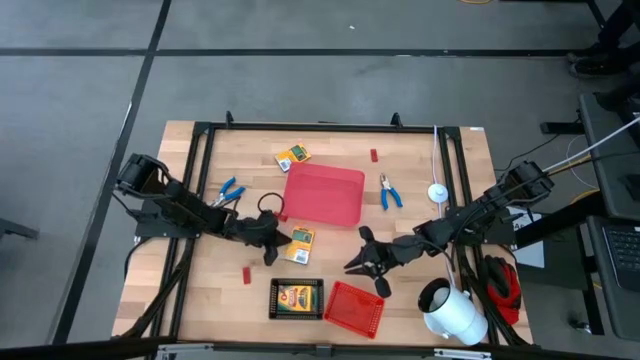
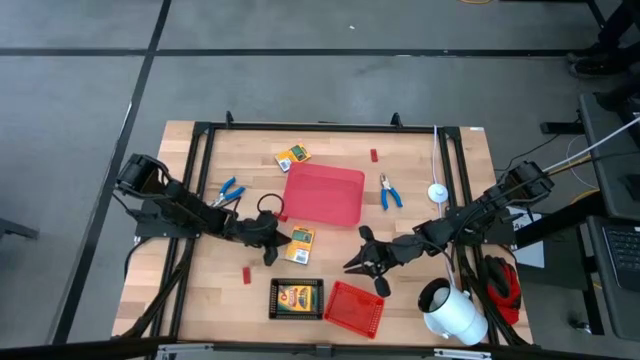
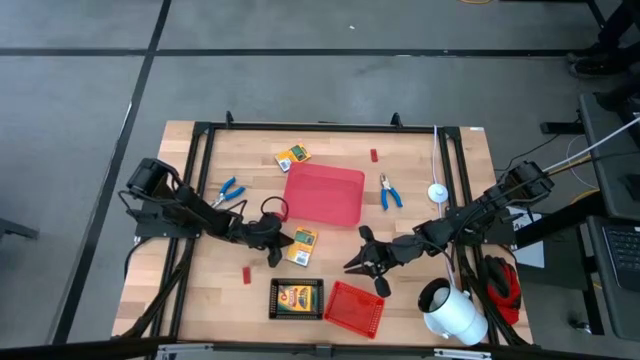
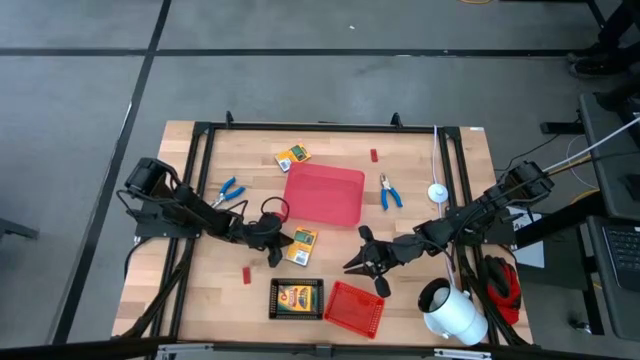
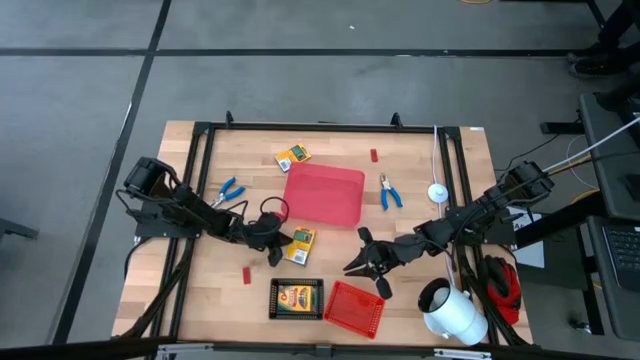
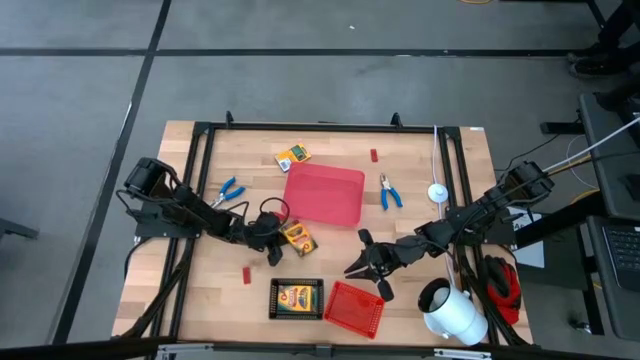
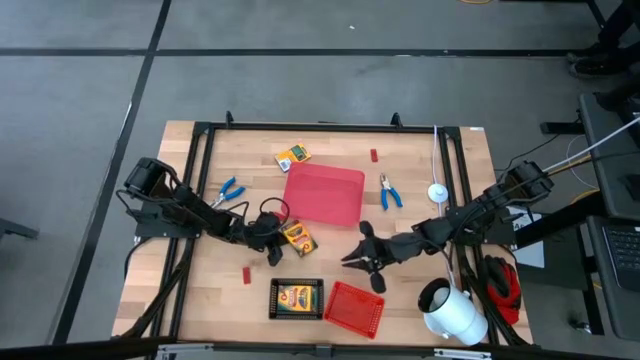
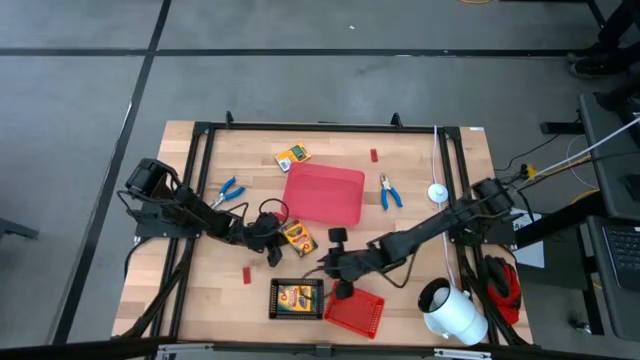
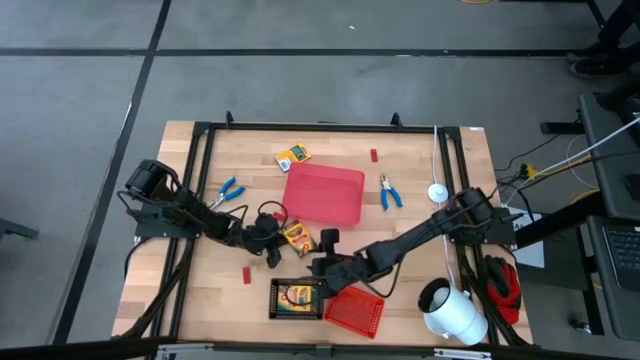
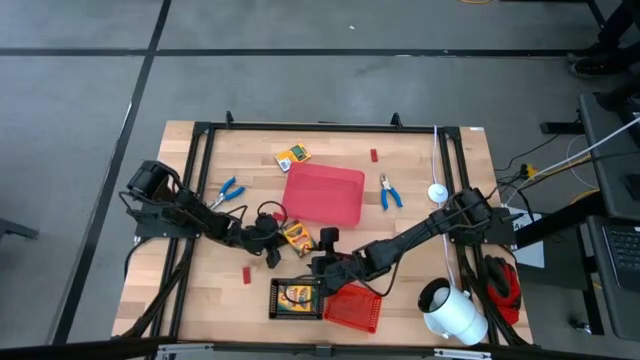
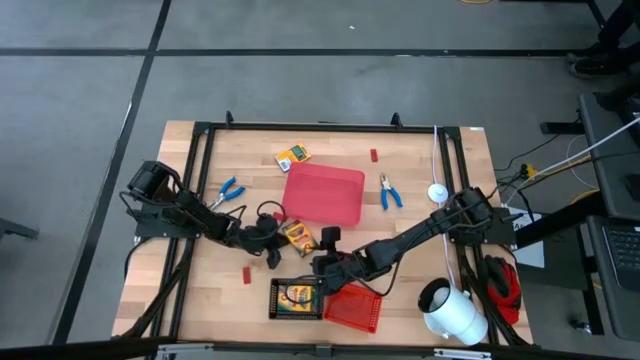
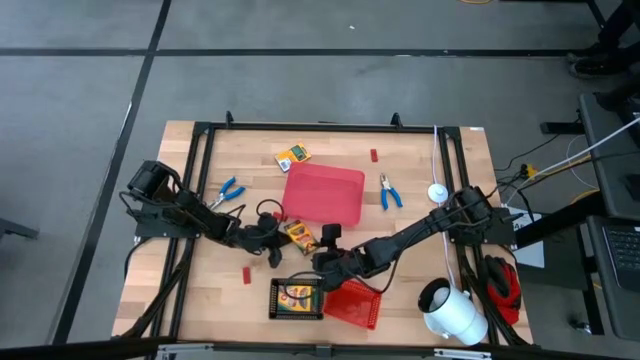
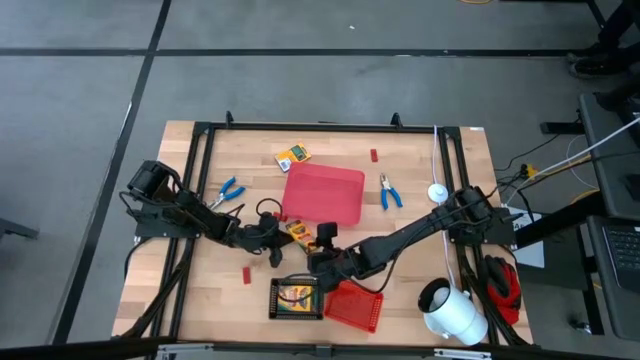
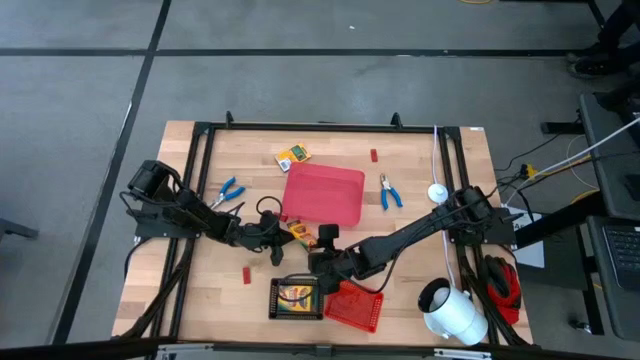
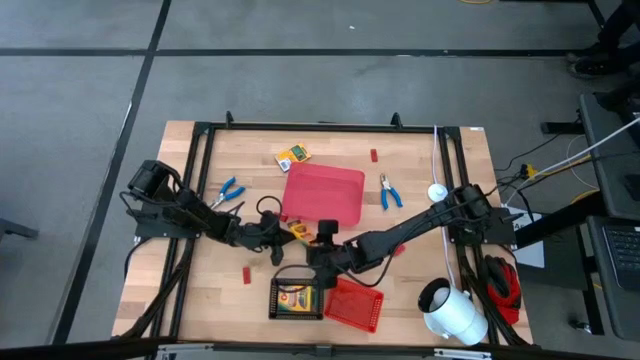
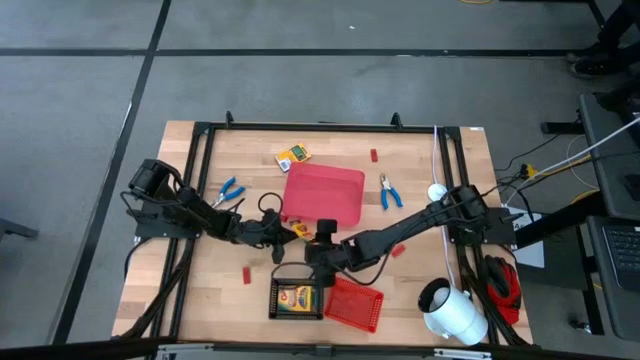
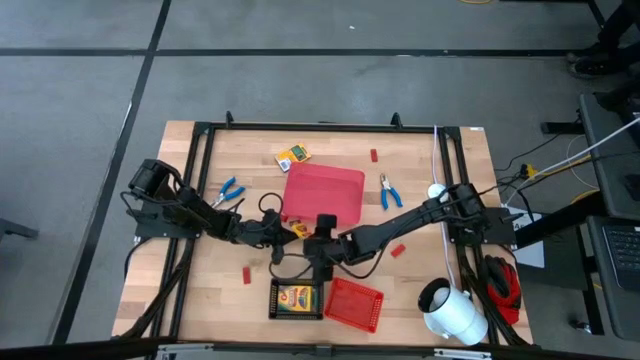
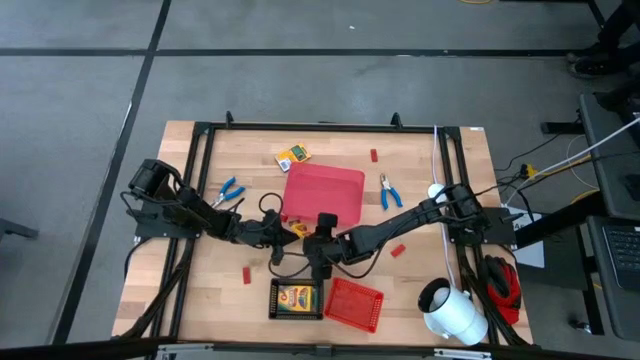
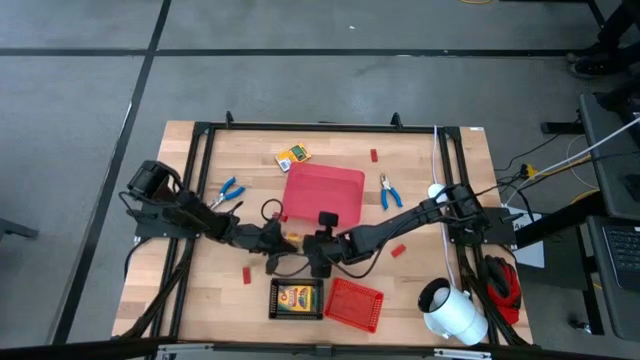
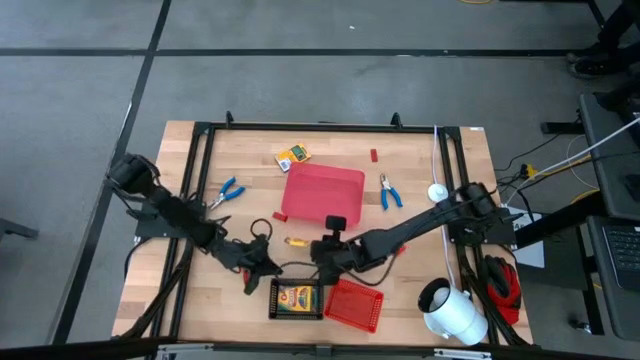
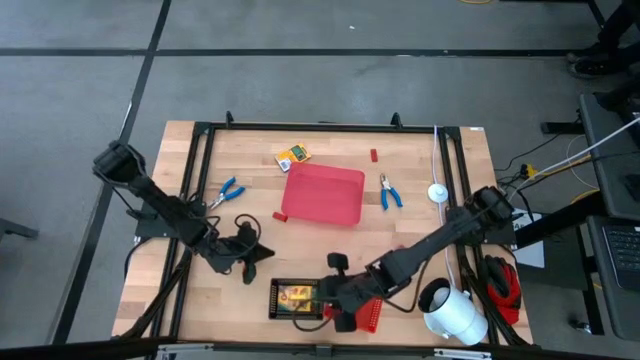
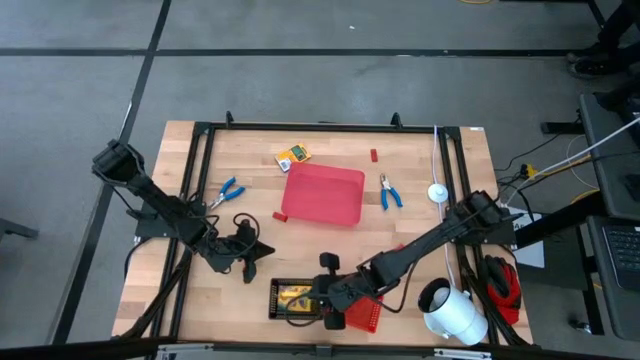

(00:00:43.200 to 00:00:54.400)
Task: Pick & Place School Supplies
Put the crayon box into the black bin

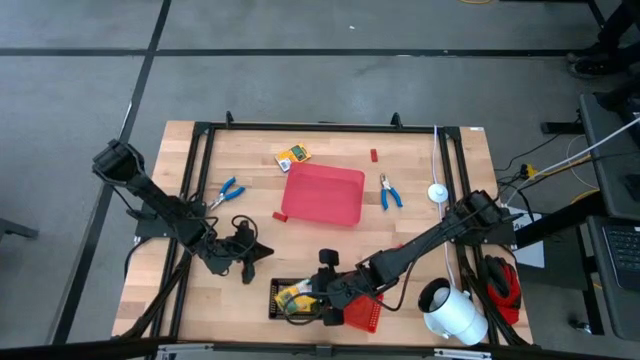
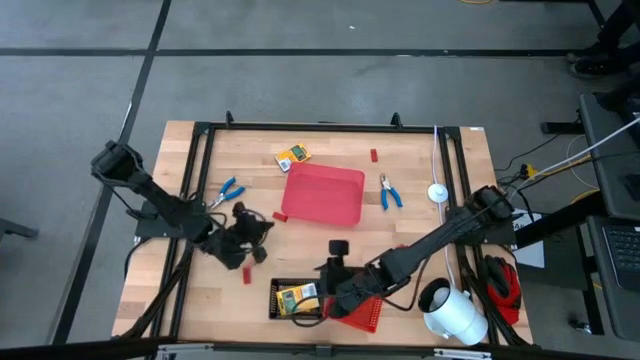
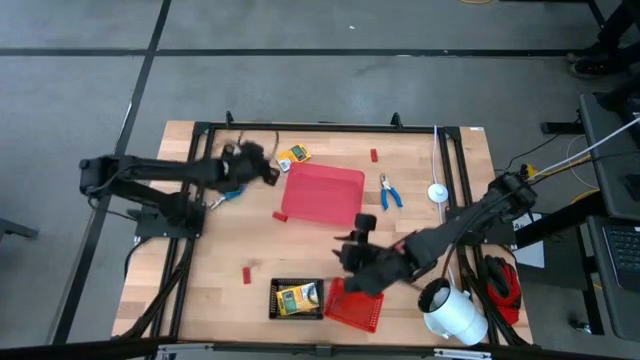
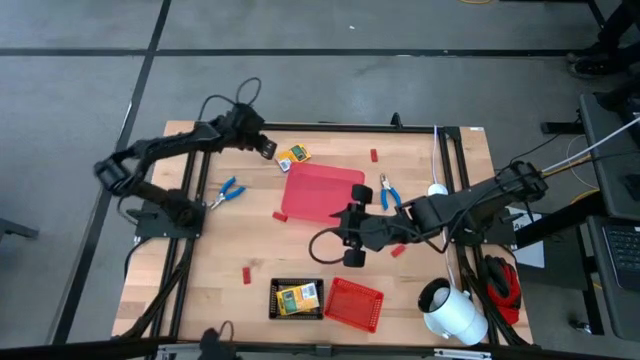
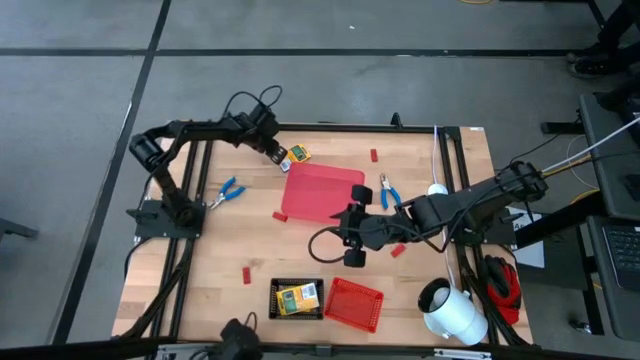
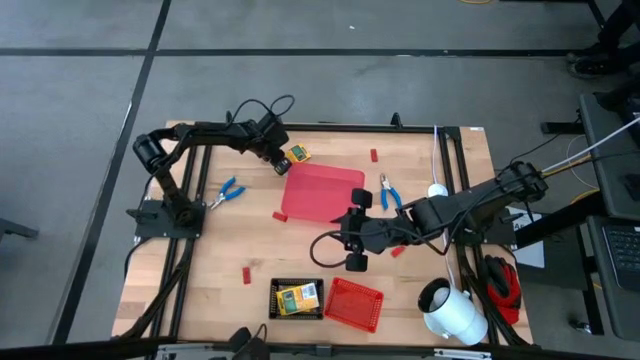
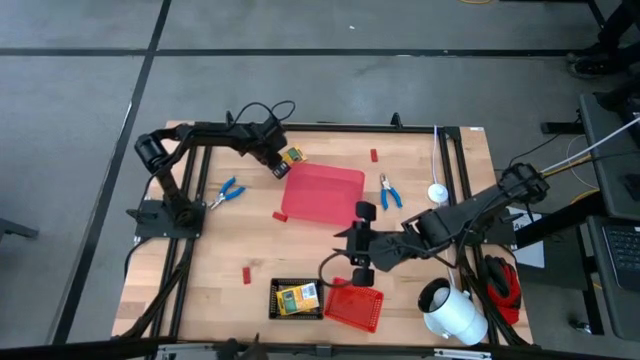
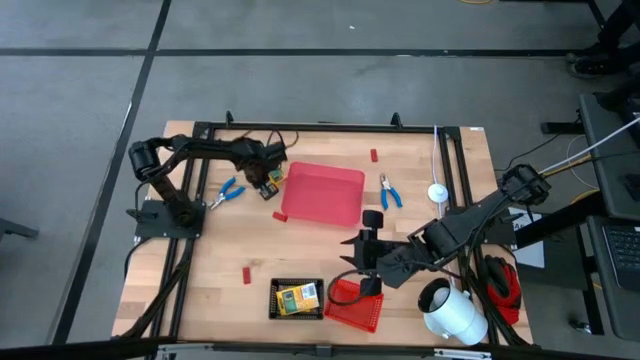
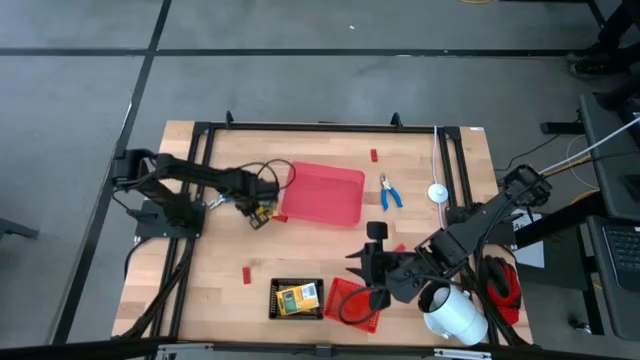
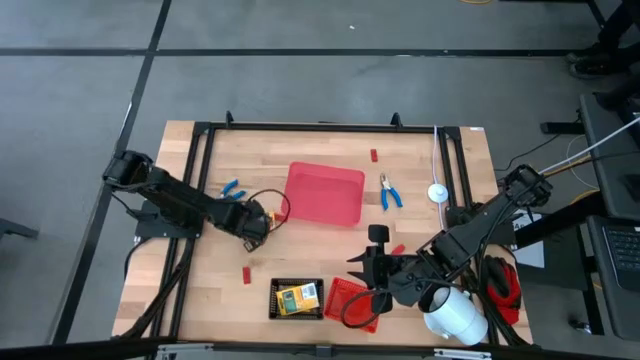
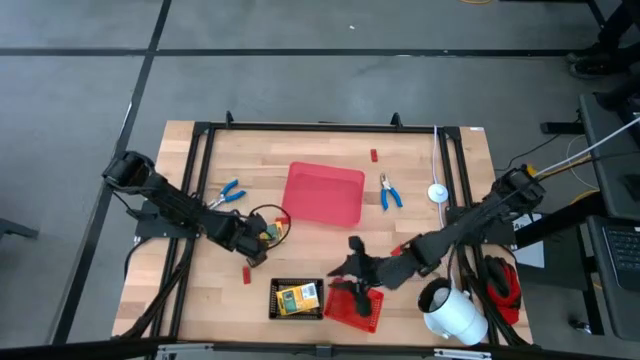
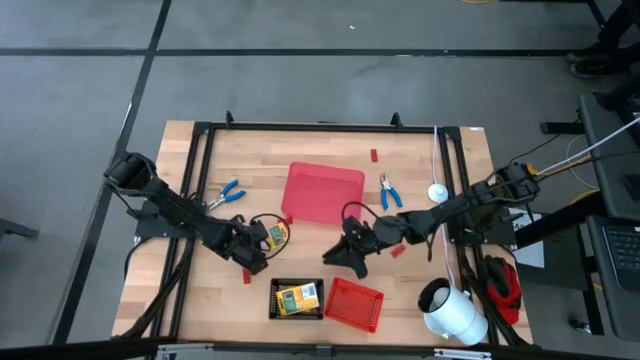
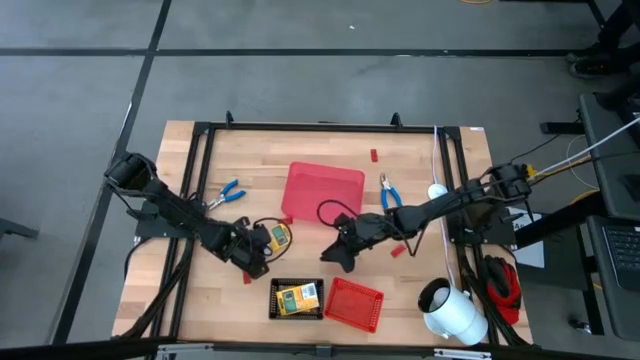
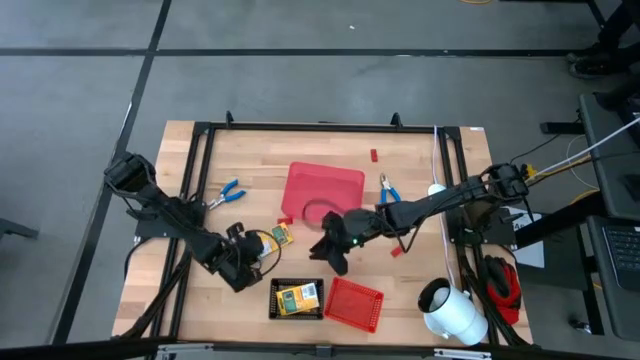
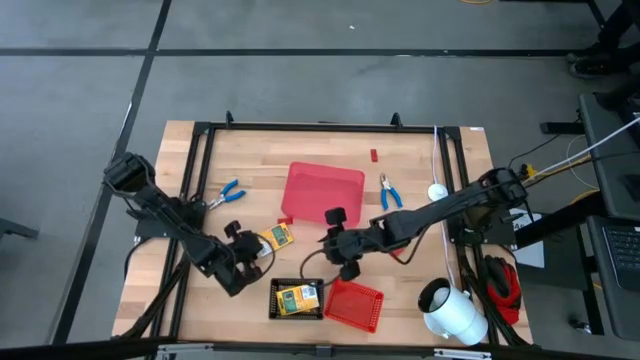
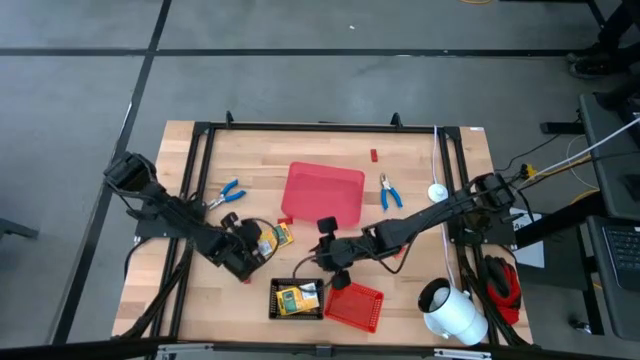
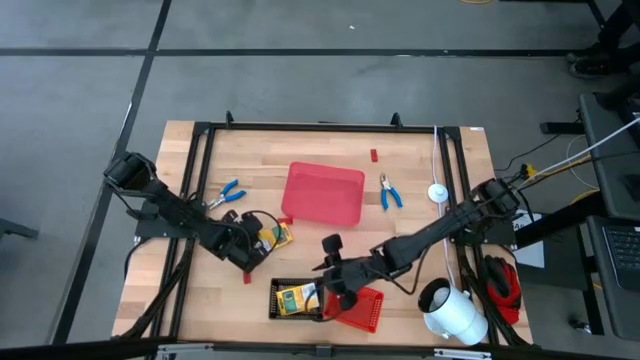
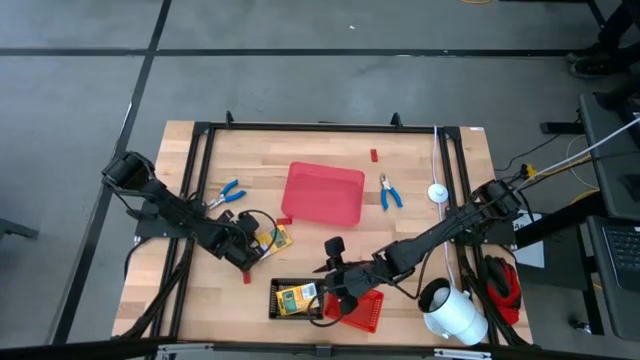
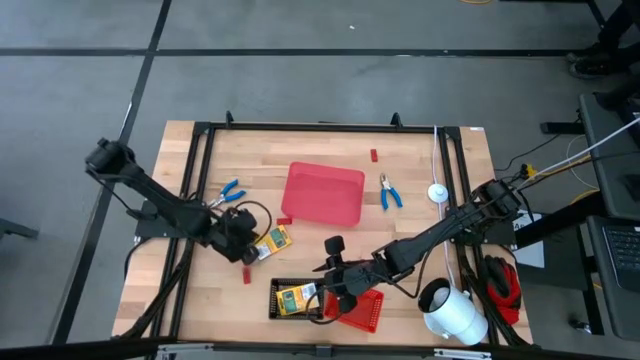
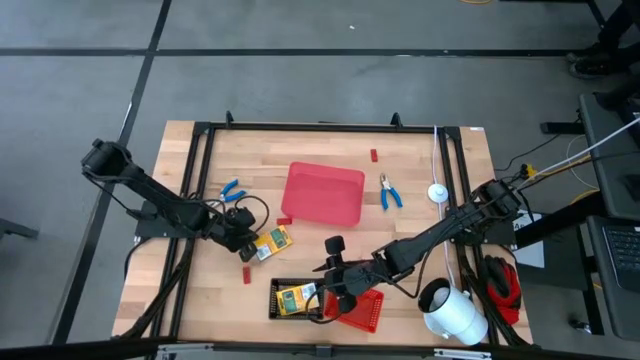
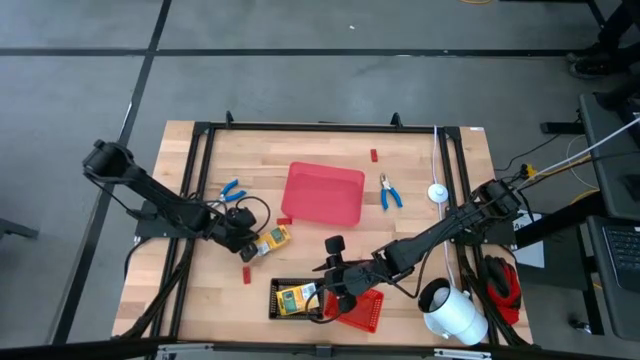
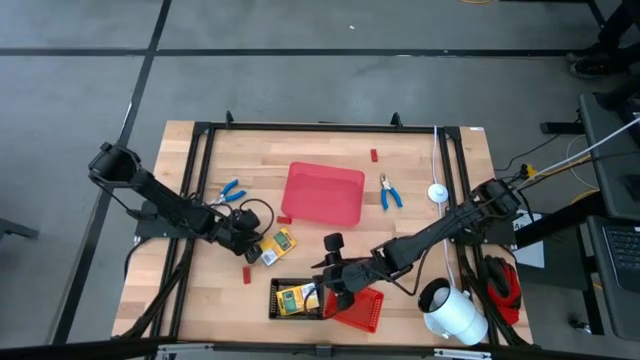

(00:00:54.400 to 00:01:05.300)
Put the crayon box into the black bin
